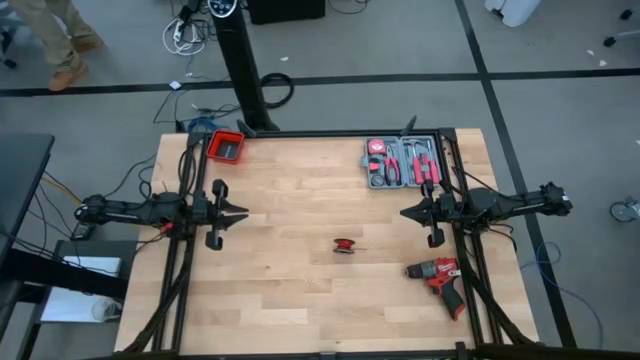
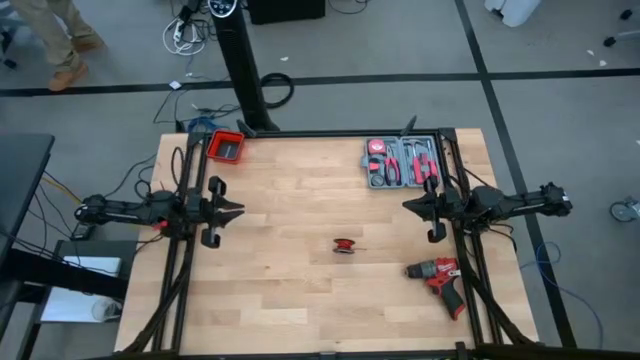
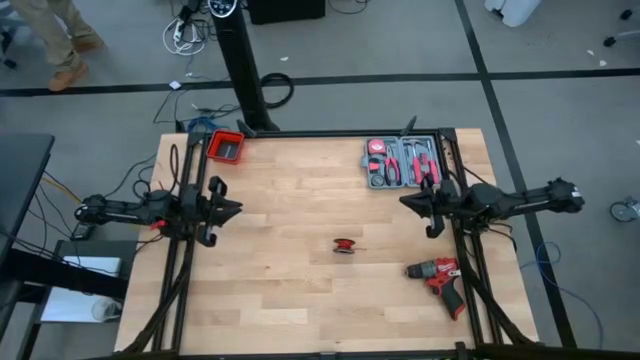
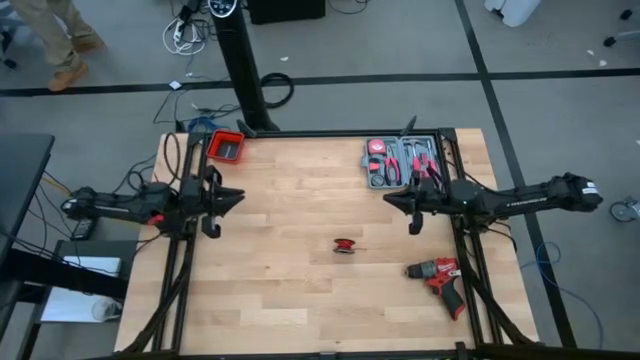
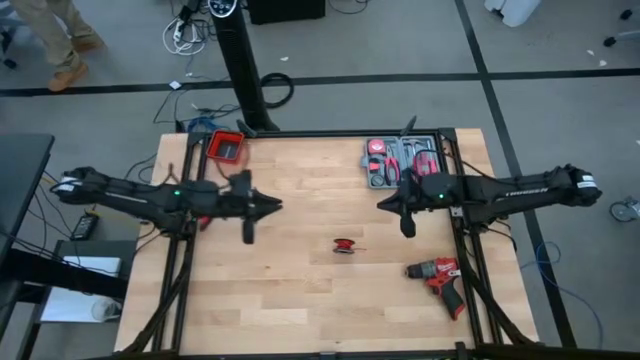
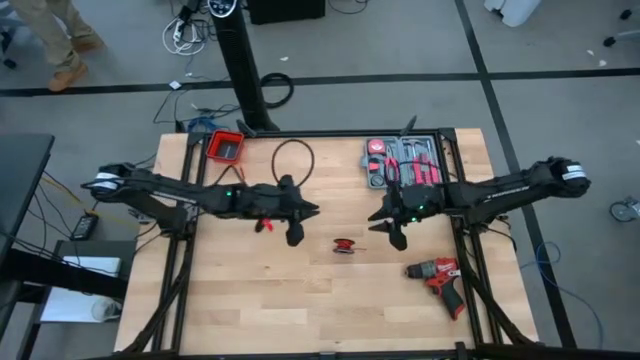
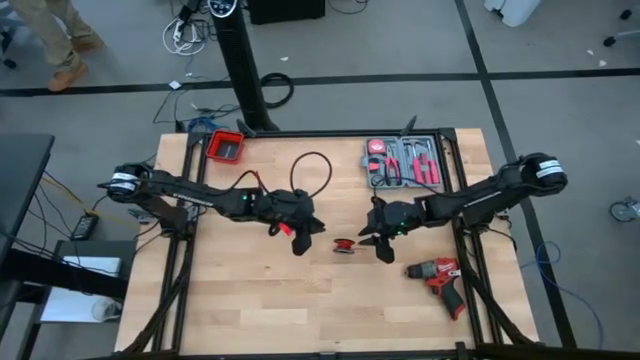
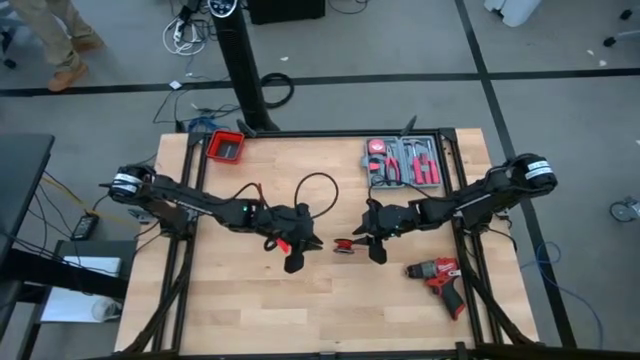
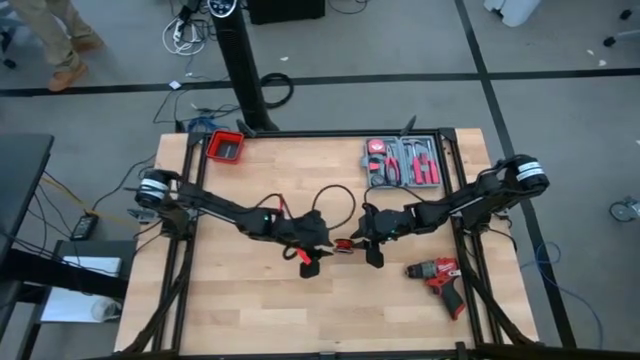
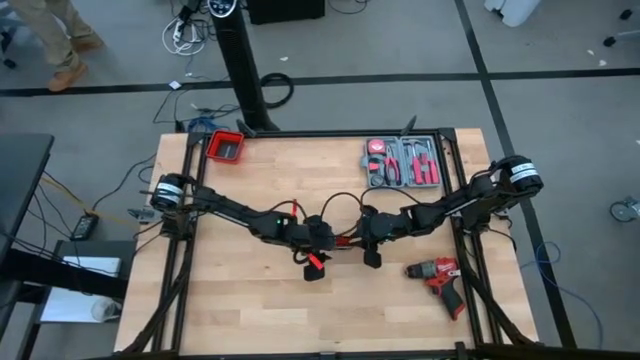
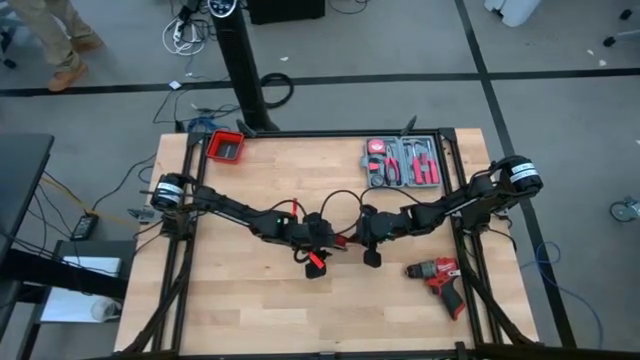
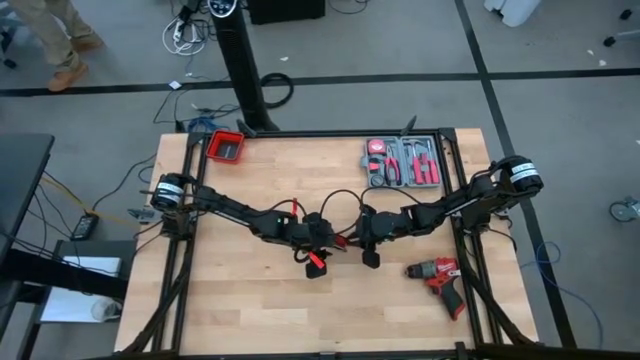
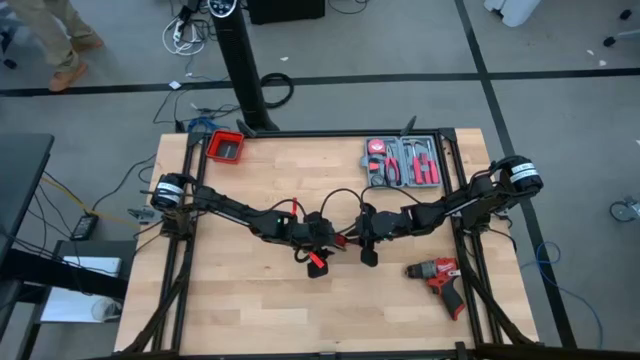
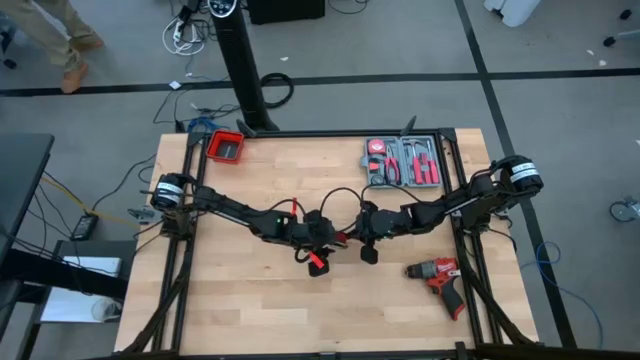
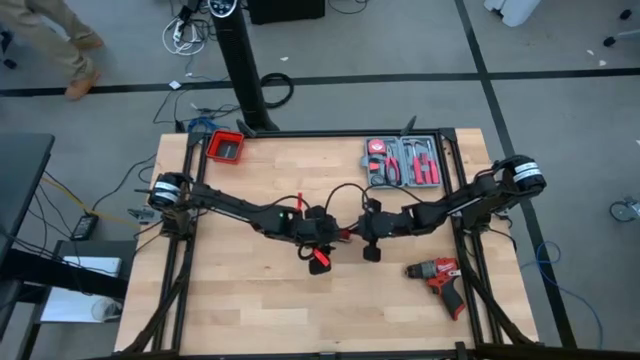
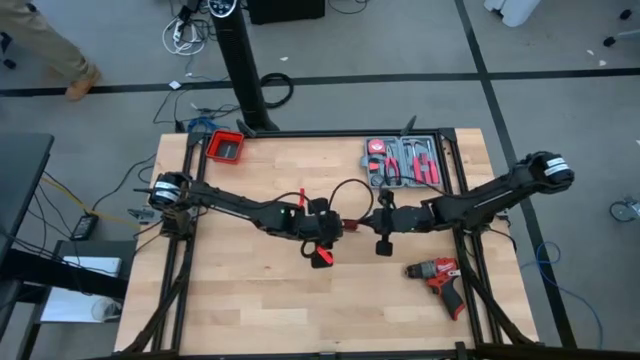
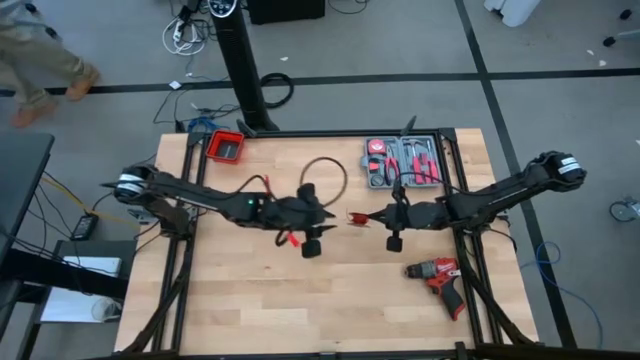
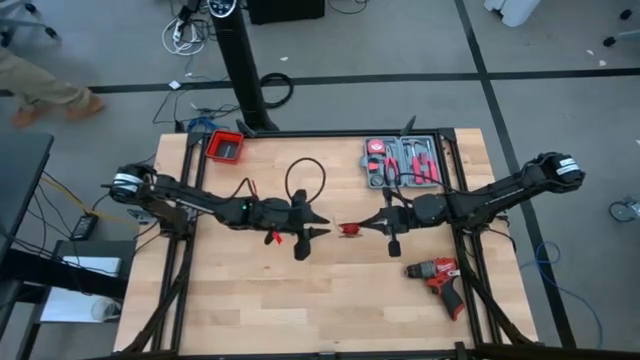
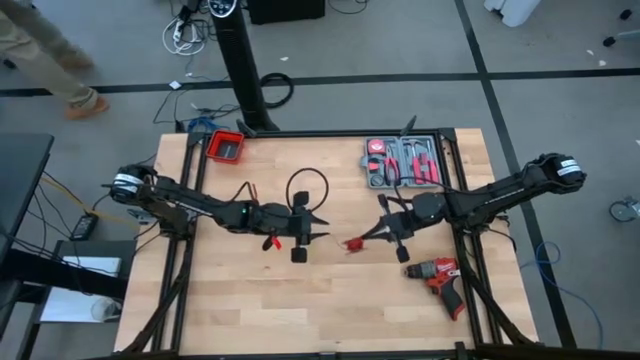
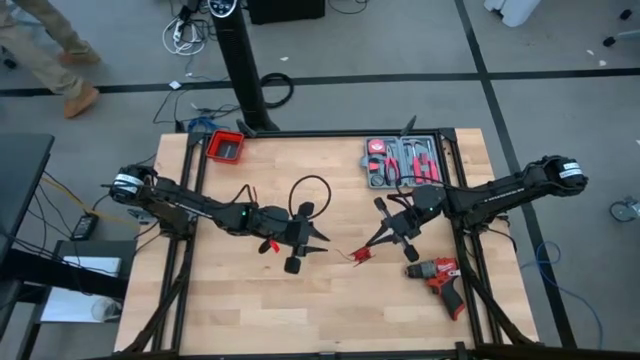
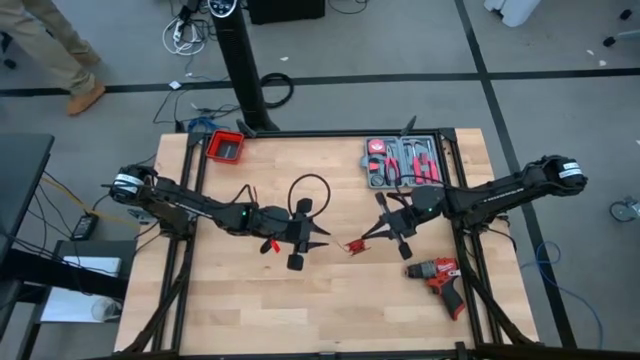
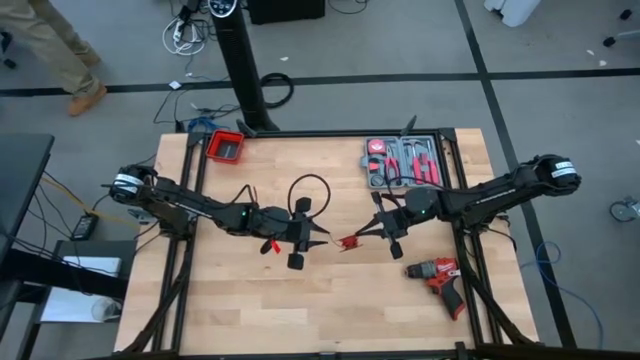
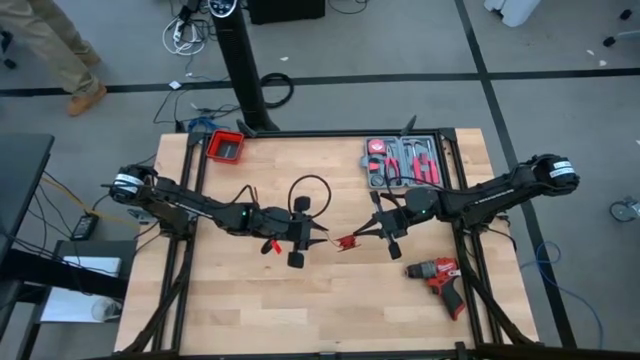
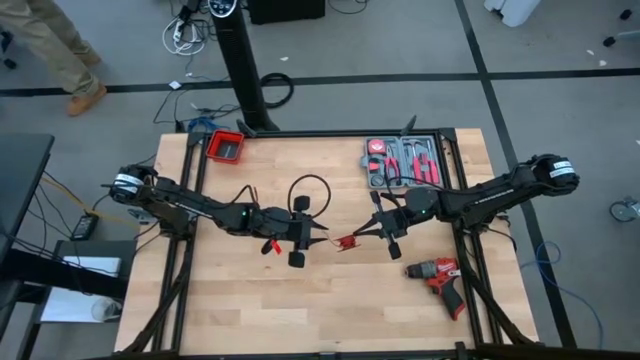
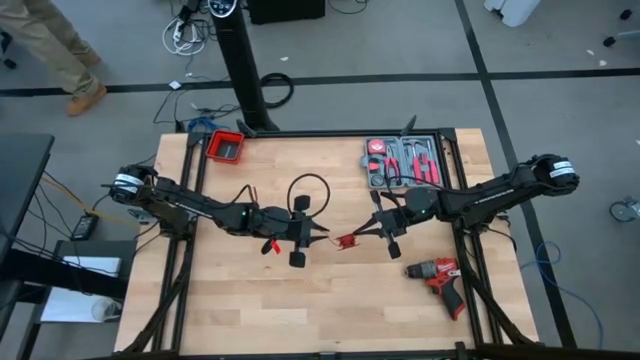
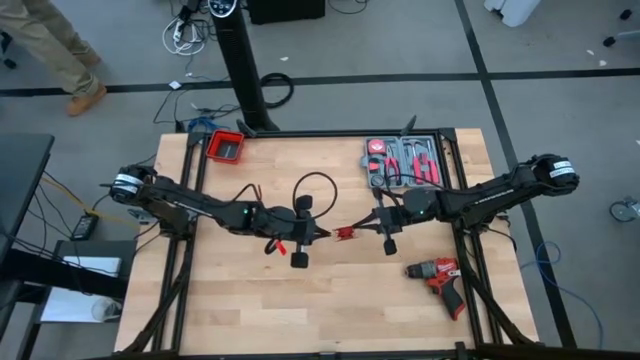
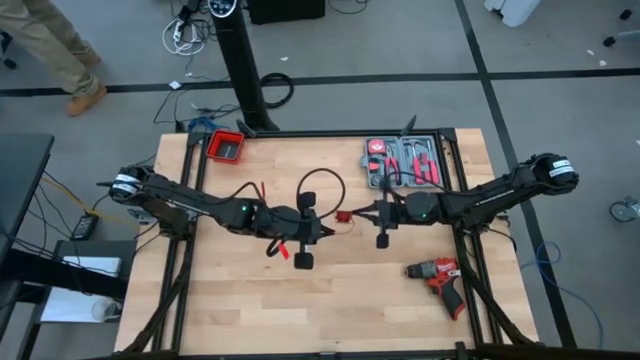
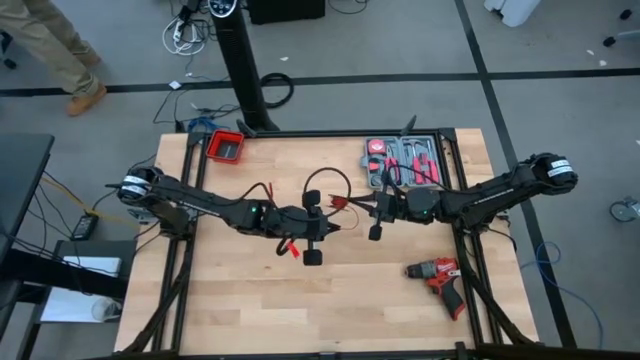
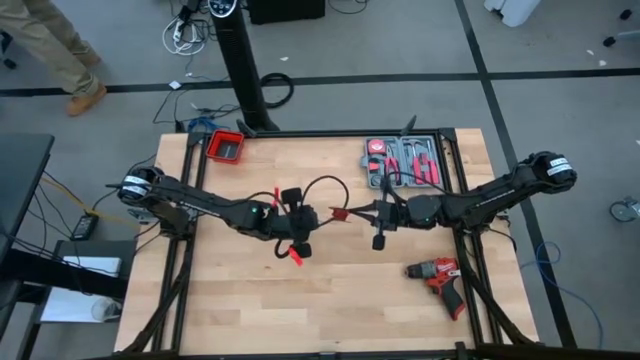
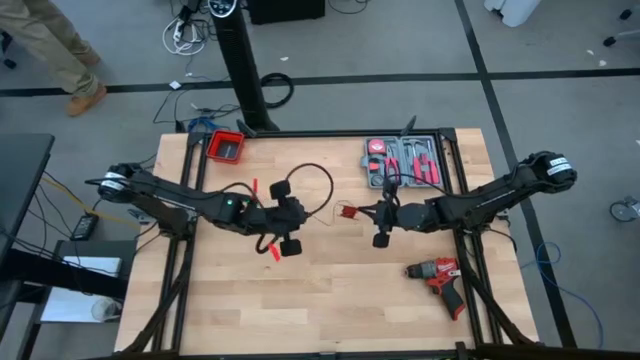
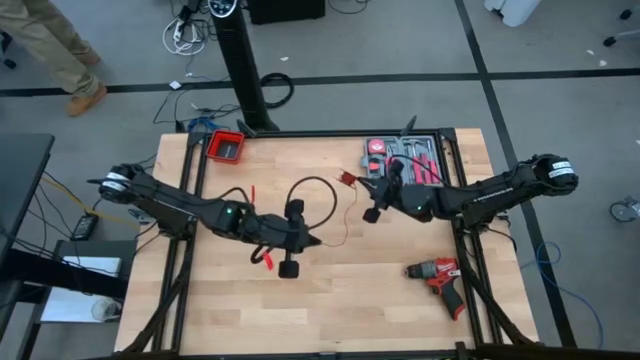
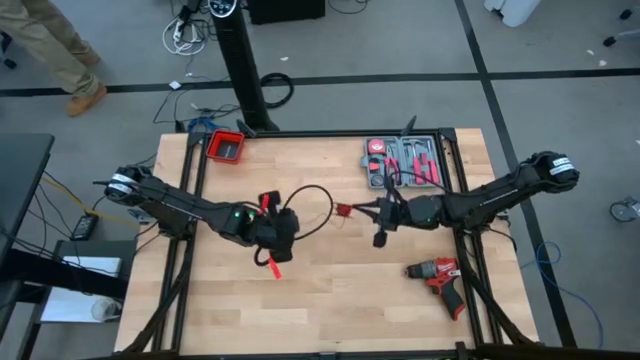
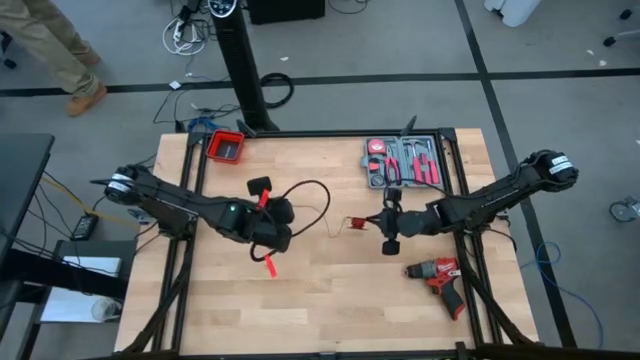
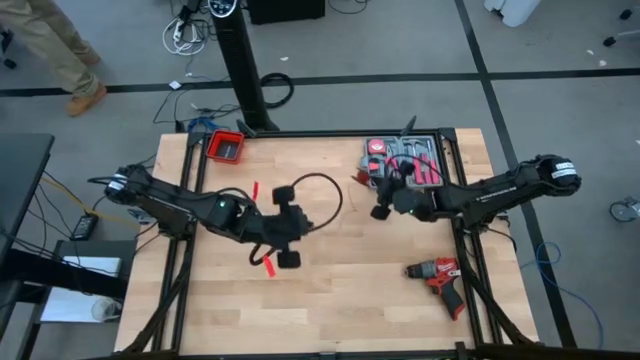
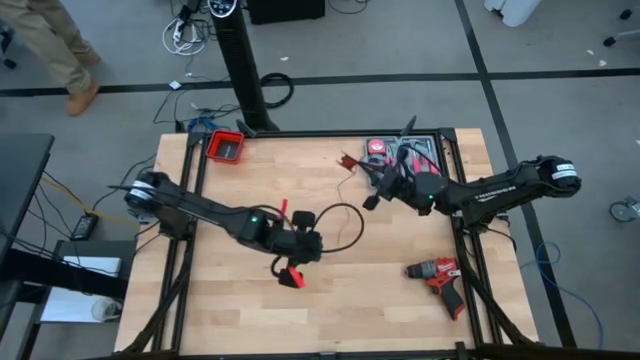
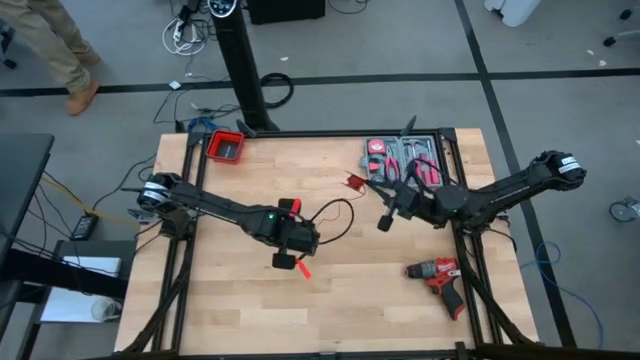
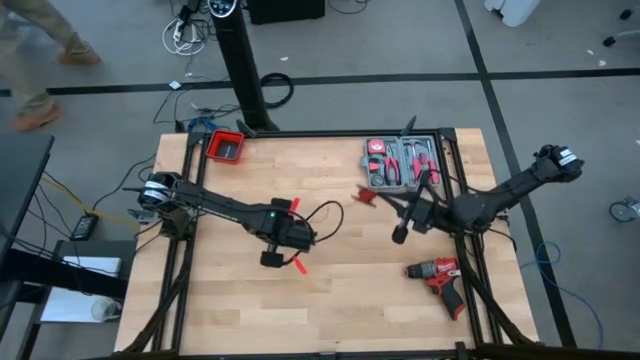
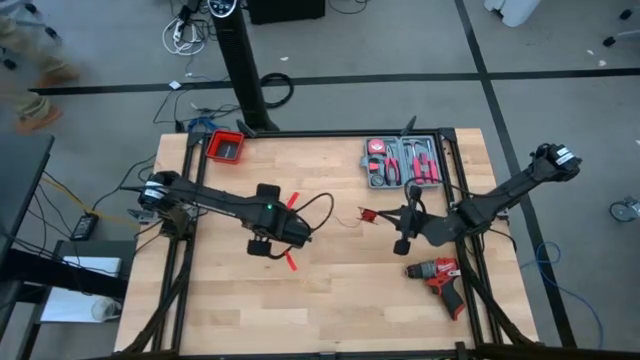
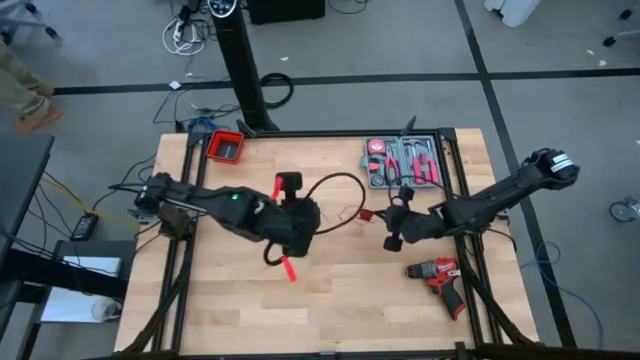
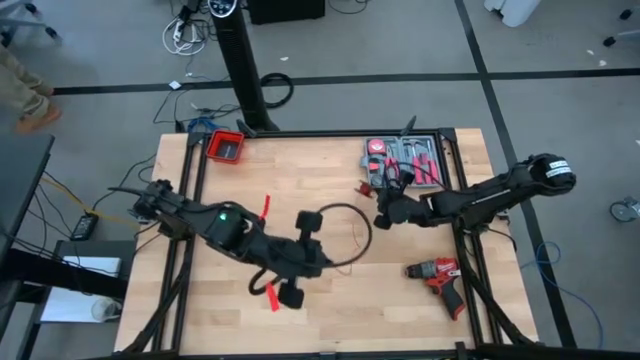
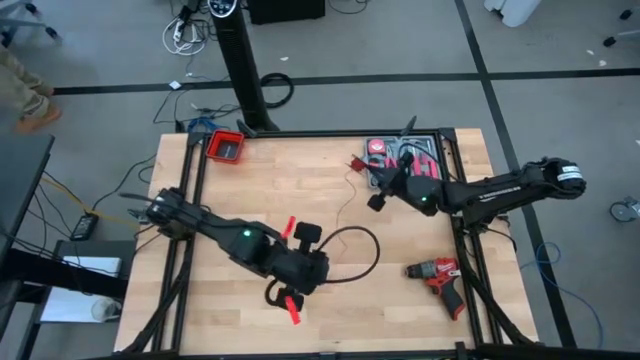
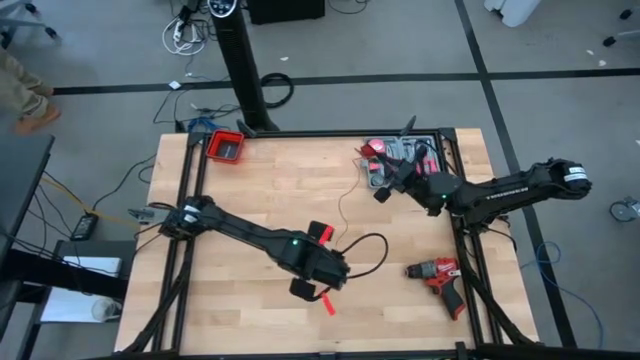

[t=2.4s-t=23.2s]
Task: Coil cords
Uncoil the red wire from the black spool
